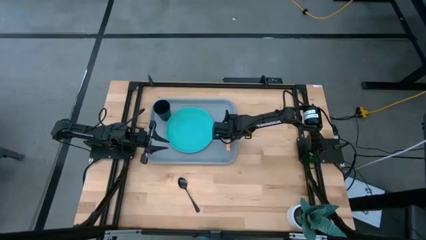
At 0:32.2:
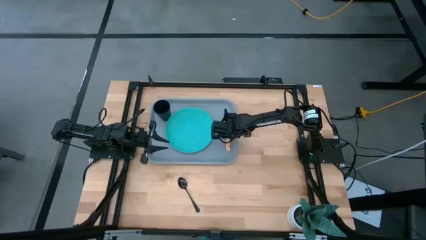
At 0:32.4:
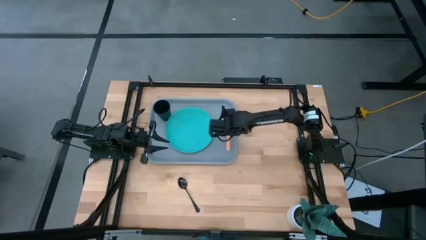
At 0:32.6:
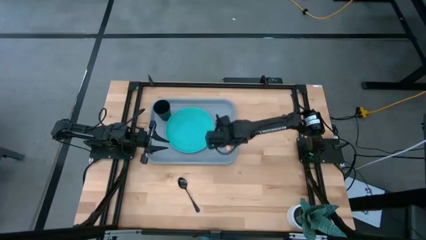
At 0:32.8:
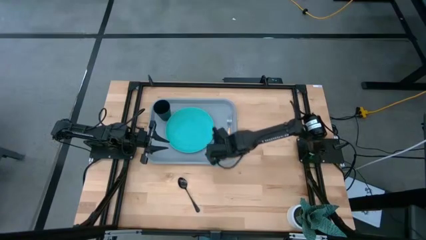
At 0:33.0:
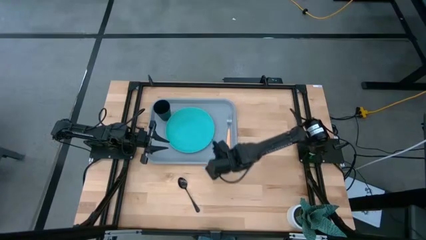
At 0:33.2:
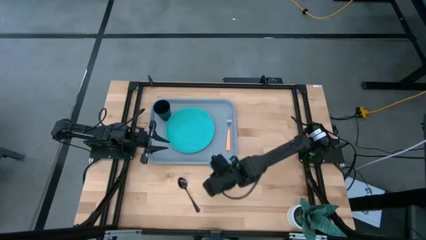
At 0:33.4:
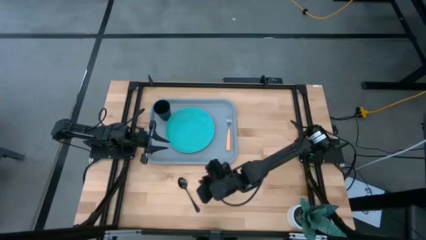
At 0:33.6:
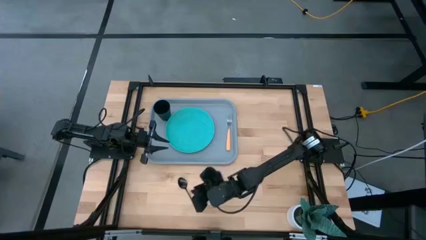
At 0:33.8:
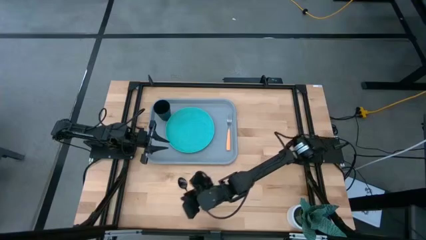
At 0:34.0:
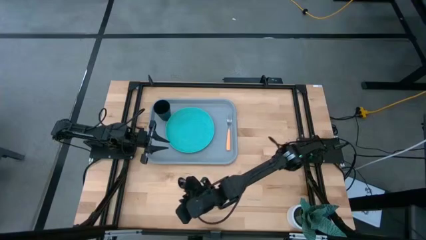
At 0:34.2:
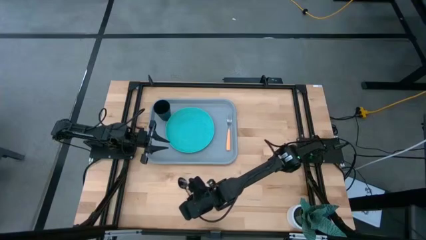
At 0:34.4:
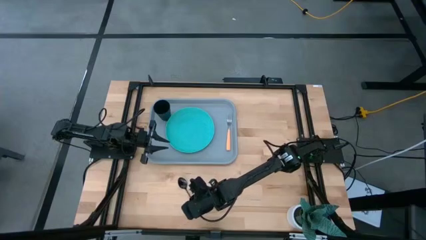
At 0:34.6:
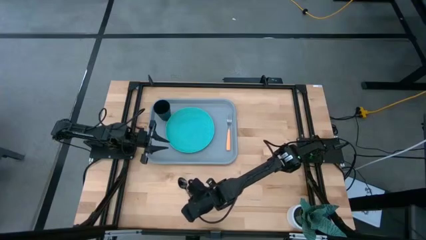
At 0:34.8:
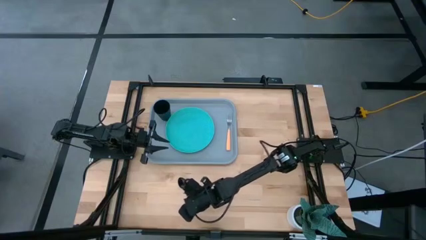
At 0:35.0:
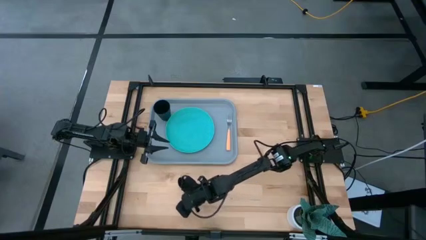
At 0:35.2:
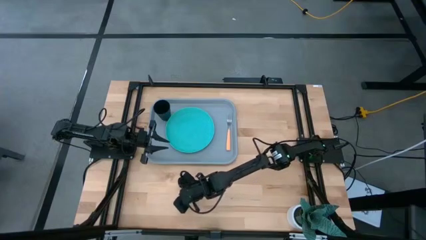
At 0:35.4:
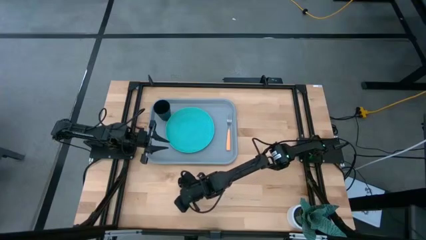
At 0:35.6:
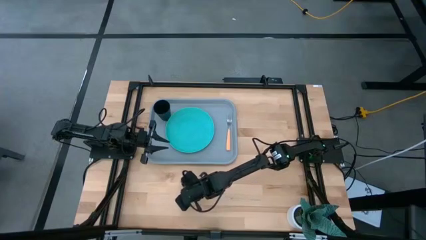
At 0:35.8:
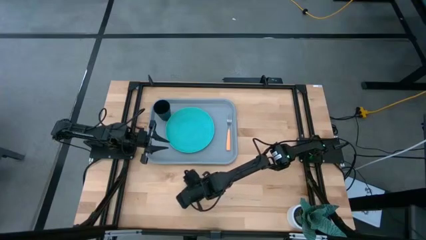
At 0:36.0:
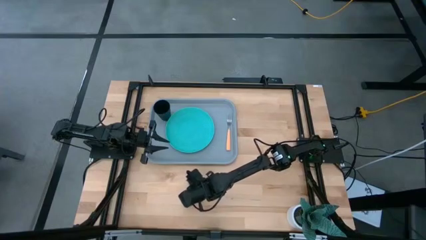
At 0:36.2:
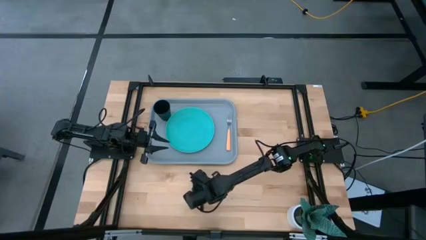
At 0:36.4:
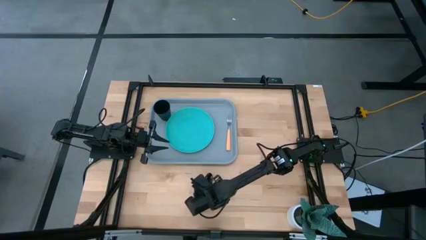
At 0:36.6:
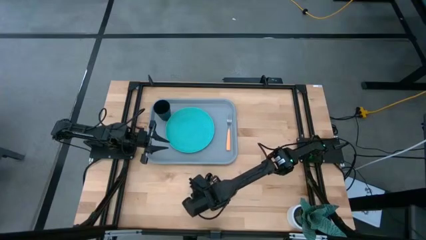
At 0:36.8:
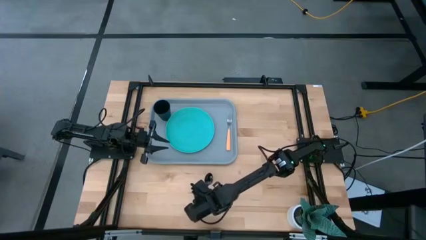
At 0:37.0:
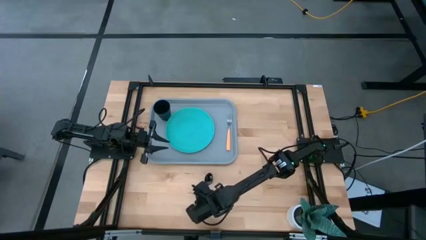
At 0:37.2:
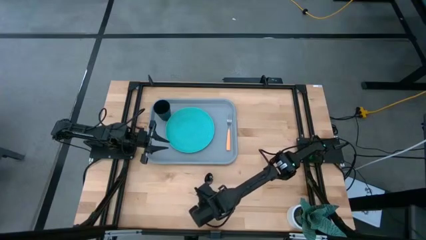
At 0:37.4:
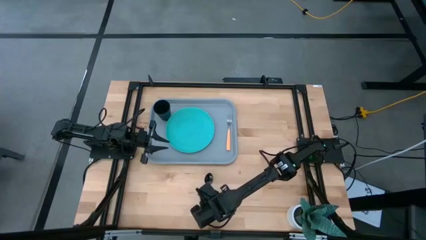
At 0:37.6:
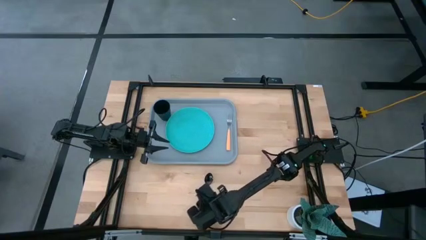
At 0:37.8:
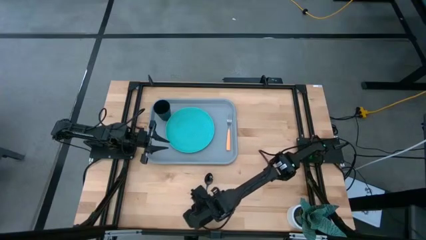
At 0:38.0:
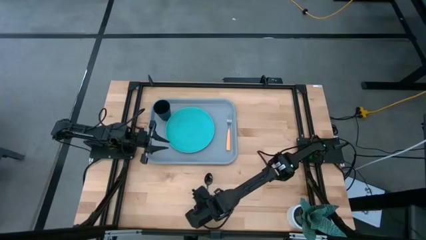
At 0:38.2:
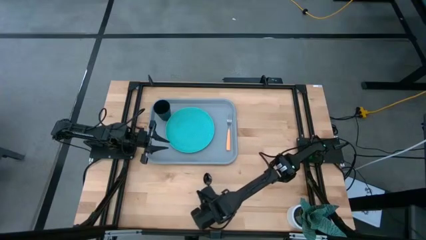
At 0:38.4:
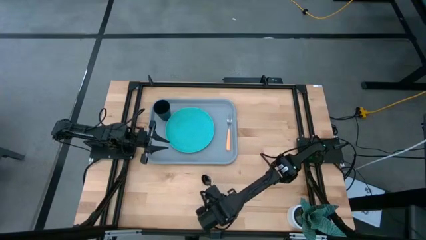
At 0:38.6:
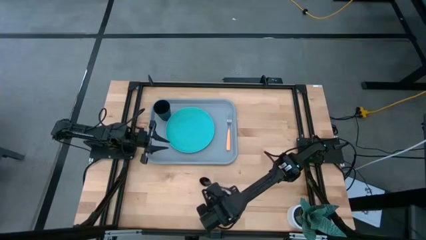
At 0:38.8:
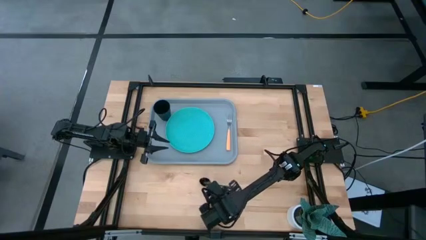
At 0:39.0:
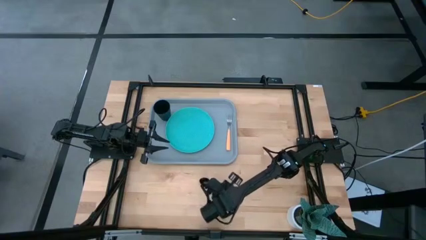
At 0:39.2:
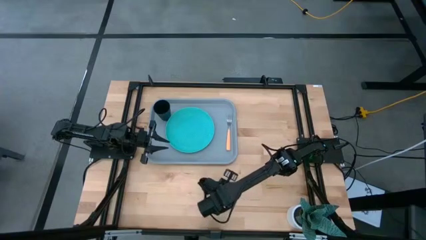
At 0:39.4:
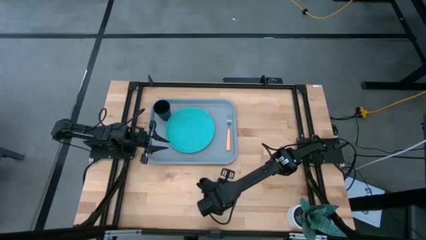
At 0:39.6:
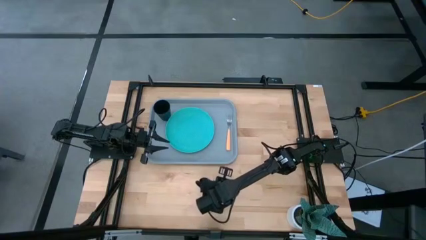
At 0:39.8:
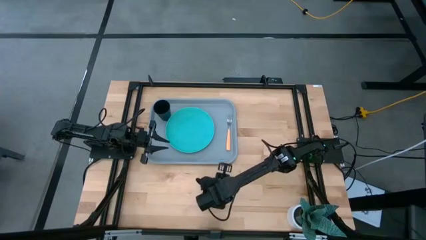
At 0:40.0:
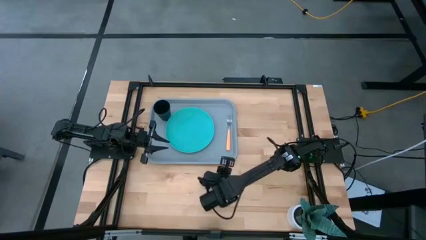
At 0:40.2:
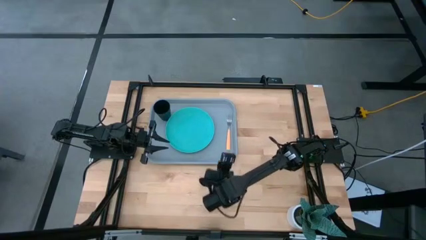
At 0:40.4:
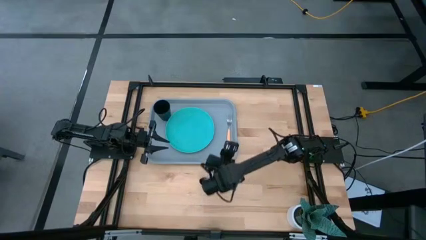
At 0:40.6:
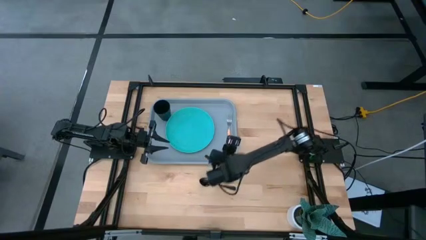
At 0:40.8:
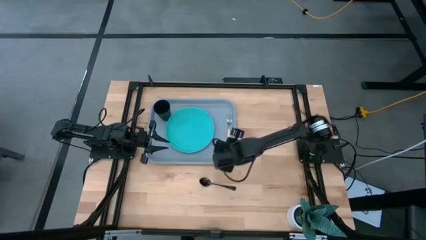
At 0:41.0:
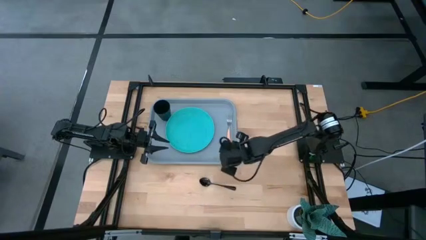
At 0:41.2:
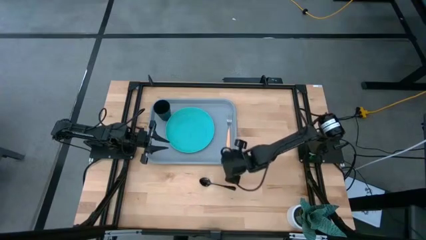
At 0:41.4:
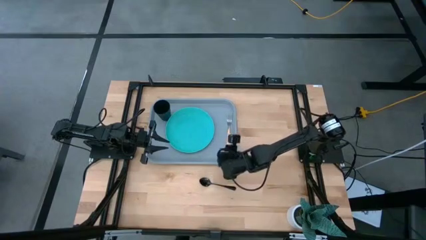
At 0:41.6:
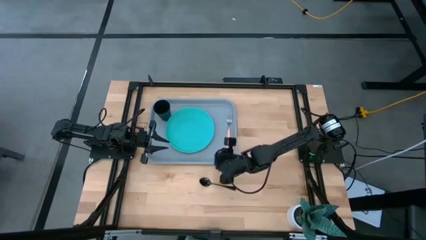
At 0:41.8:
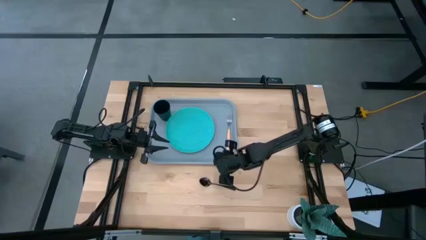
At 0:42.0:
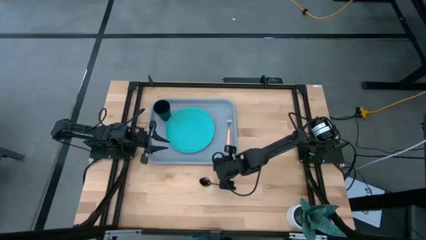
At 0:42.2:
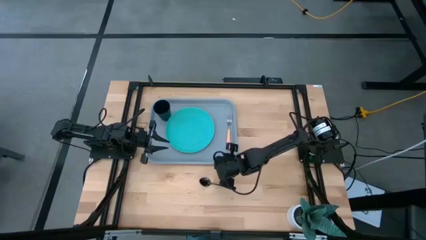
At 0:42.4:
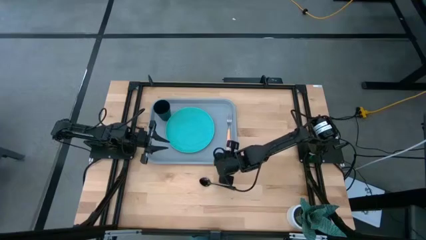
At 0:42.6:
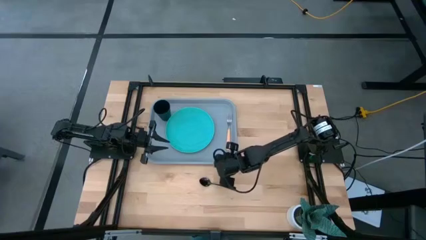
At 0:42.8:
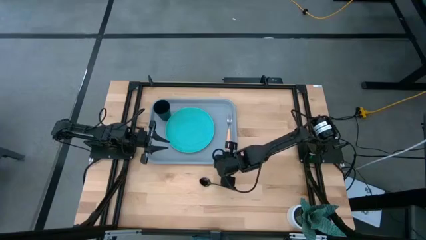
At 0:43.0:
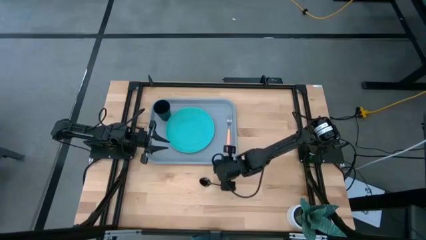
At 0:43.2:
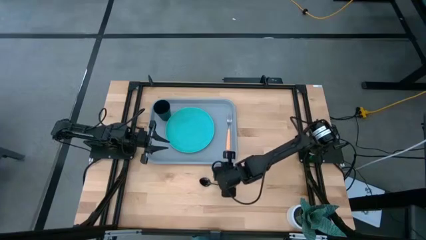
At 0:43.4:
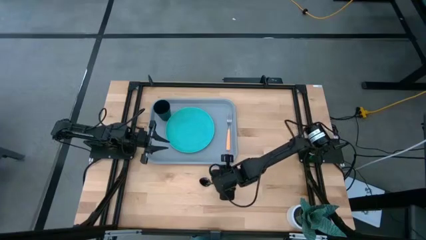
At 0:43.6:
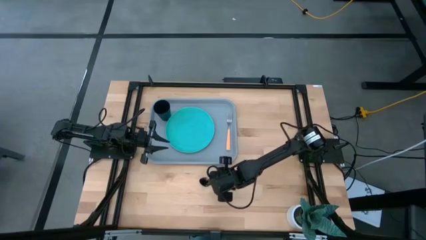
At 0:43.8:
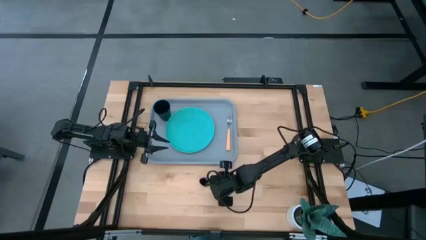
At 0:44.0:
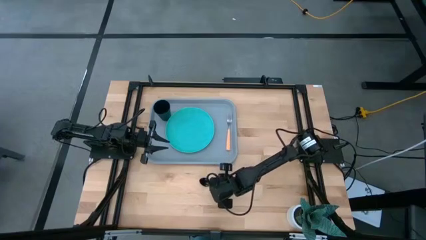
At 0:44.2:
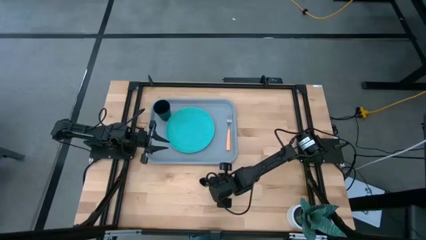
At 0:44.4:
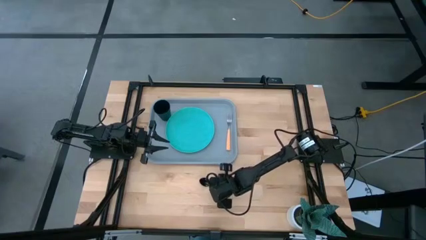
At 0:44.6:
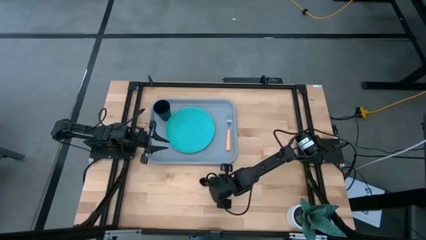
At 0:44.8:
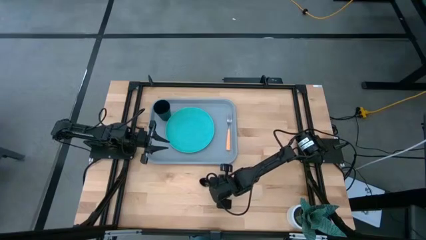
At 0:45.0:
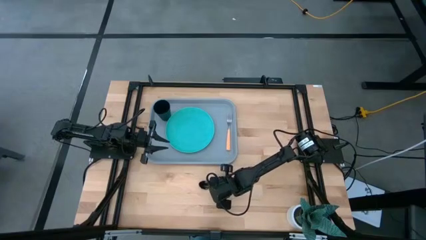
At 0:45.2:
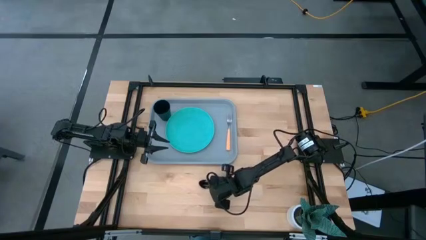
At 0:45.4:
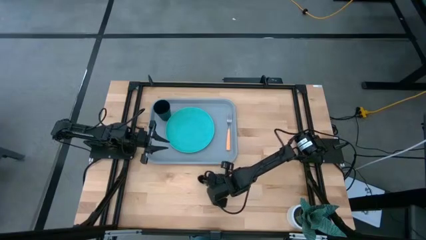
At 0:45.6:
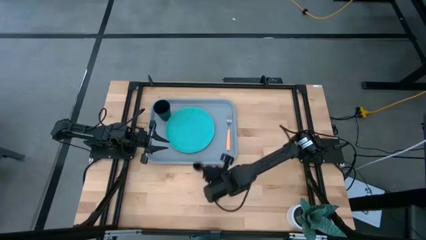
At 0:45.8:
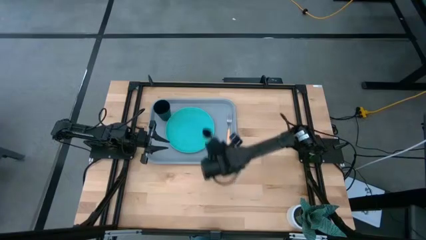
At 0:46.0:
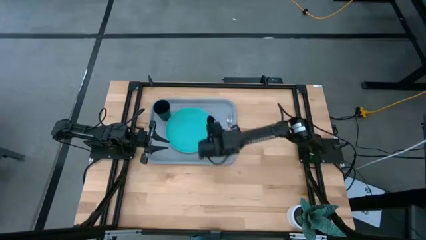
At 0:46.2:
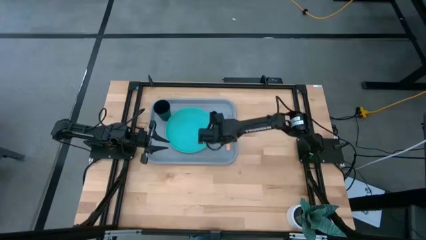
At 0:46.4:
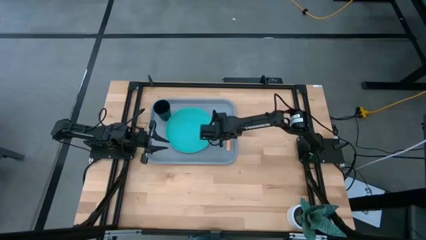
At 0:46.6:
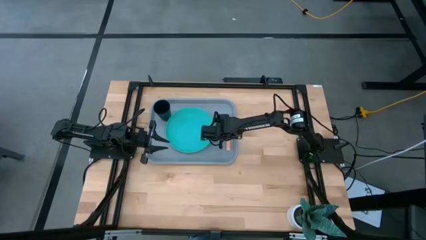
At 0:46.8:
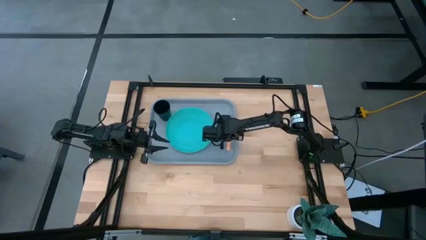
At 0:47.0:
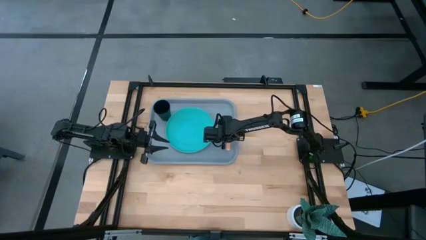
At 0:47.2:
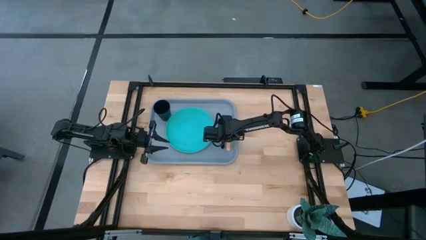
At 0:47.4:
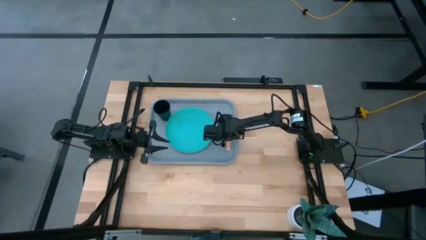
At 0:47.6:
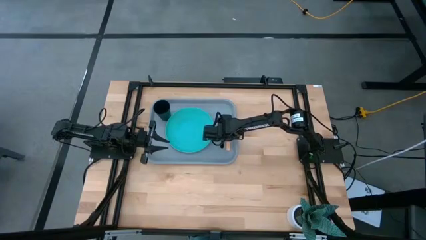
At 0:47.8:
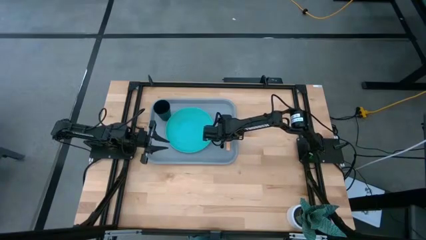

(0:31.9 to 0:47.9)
Task: Pick and place plate/cup/fork/spoon on tray
Put the black spoon on the gray table tray to the left of the orange fork
